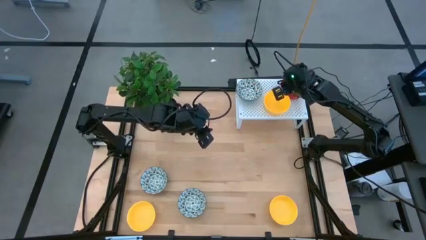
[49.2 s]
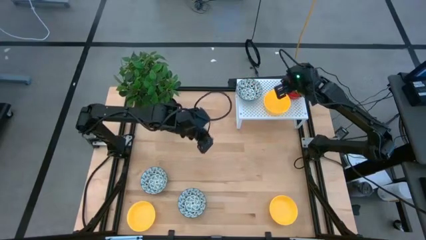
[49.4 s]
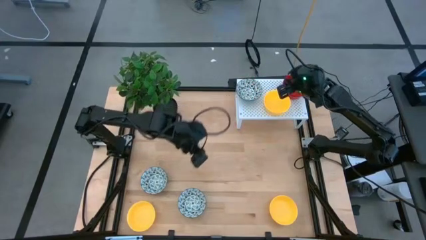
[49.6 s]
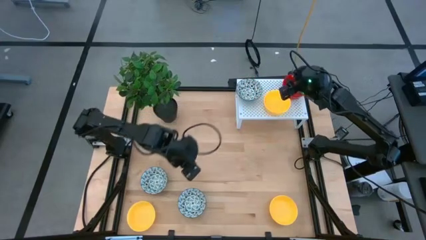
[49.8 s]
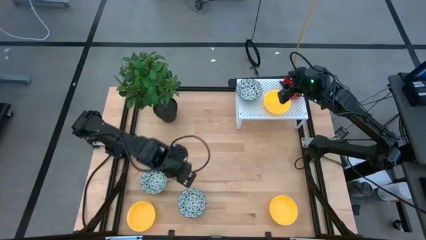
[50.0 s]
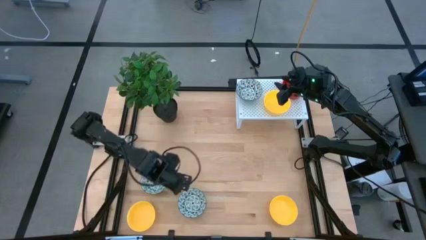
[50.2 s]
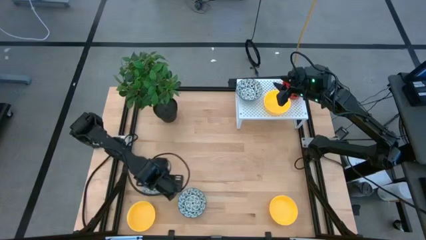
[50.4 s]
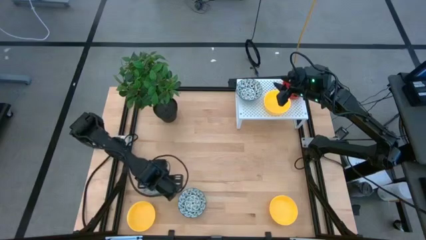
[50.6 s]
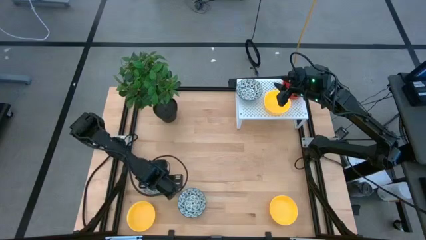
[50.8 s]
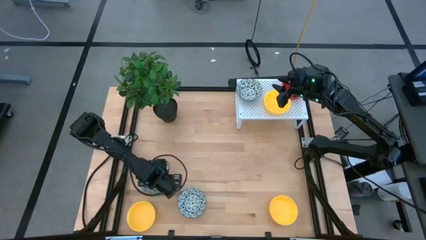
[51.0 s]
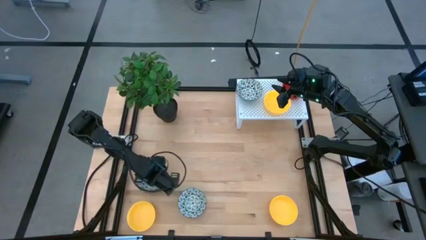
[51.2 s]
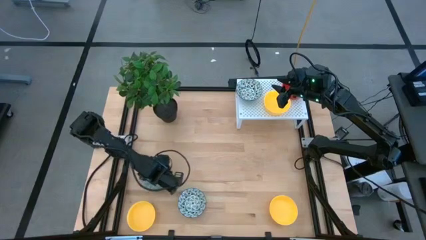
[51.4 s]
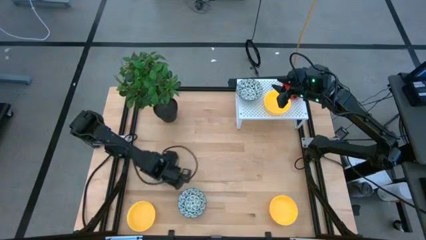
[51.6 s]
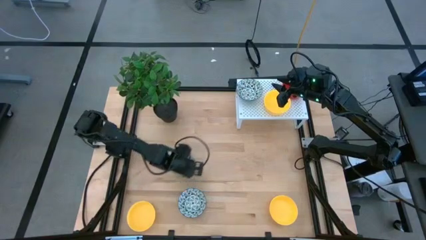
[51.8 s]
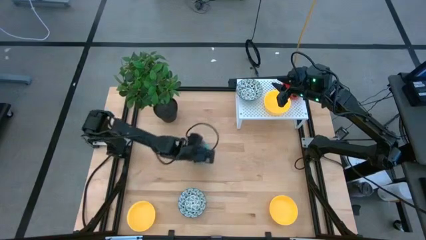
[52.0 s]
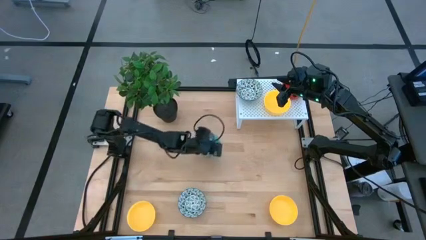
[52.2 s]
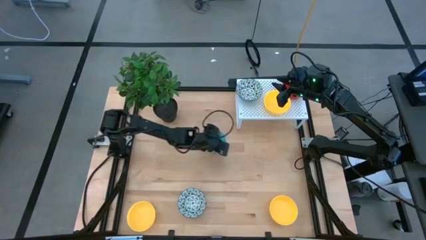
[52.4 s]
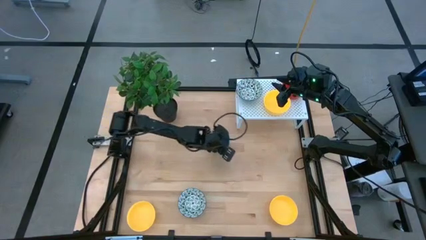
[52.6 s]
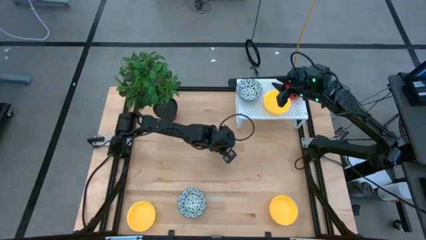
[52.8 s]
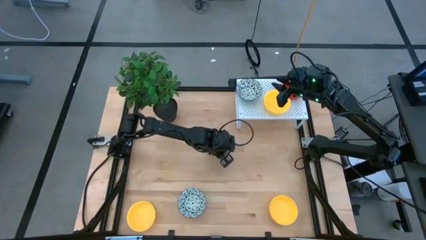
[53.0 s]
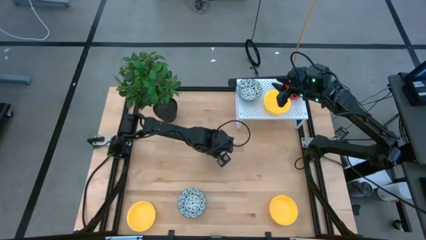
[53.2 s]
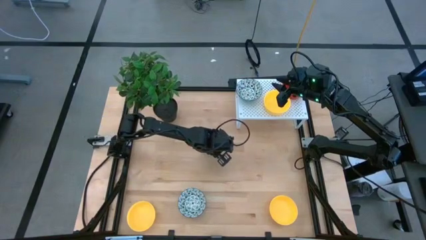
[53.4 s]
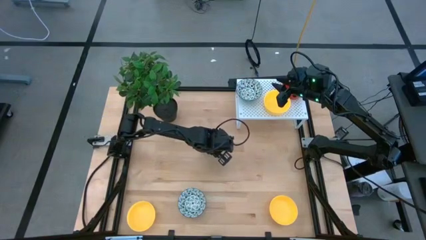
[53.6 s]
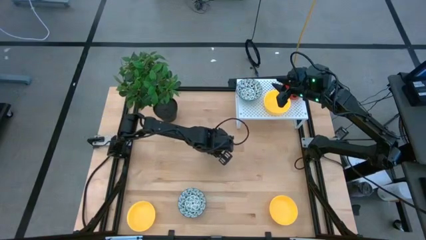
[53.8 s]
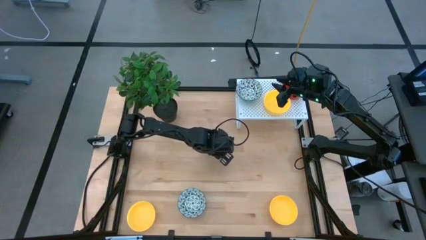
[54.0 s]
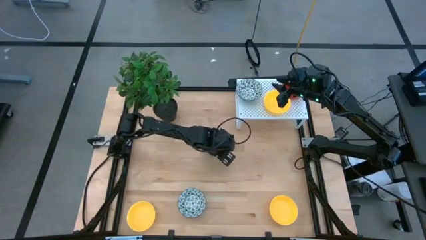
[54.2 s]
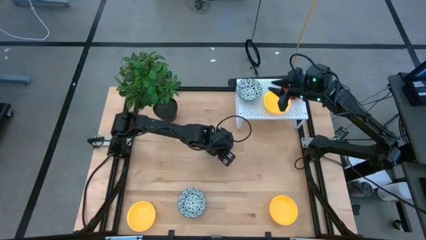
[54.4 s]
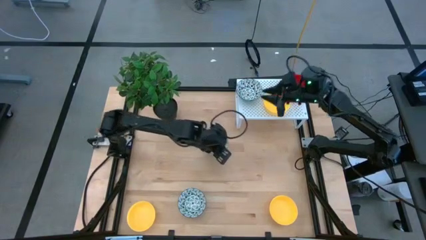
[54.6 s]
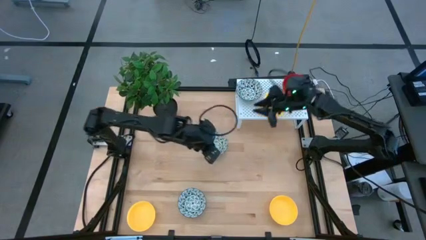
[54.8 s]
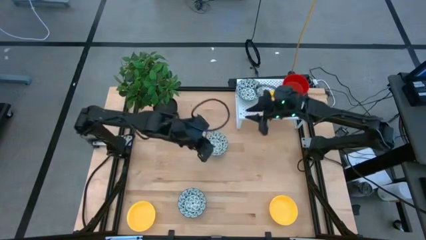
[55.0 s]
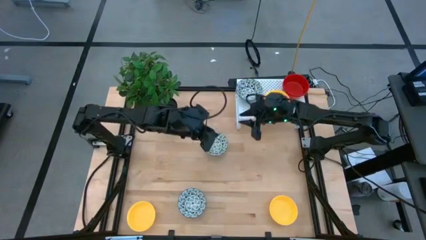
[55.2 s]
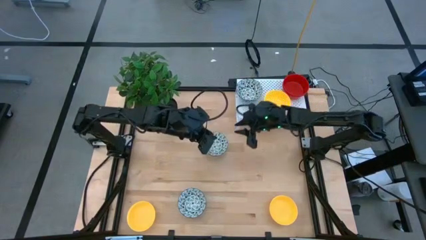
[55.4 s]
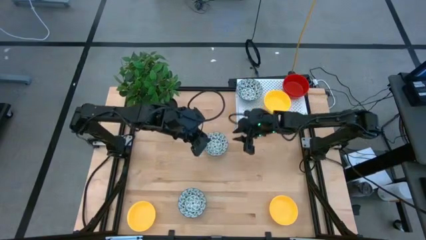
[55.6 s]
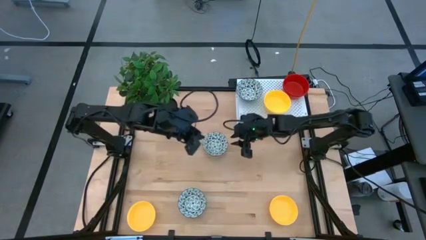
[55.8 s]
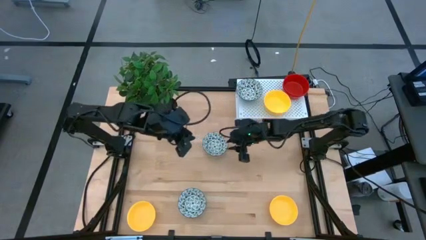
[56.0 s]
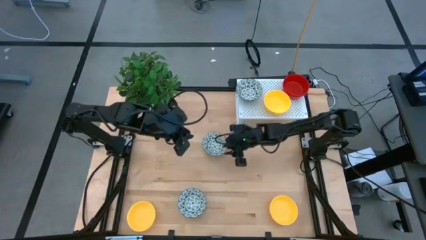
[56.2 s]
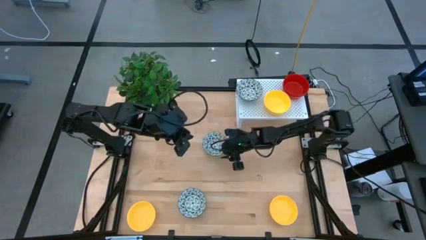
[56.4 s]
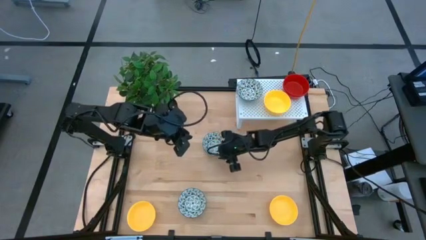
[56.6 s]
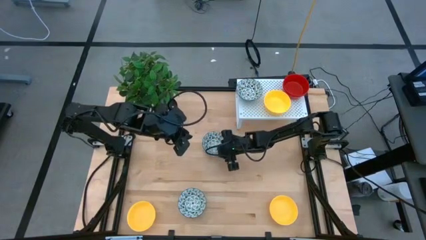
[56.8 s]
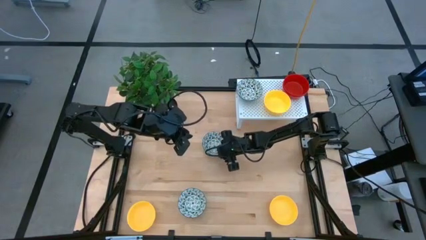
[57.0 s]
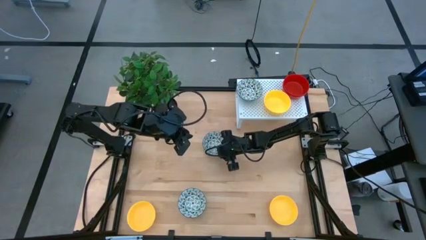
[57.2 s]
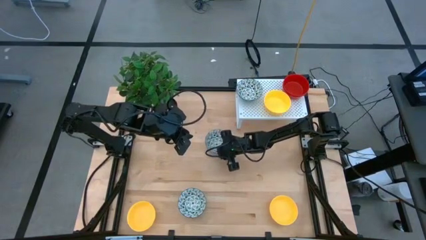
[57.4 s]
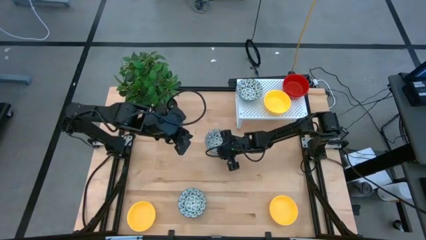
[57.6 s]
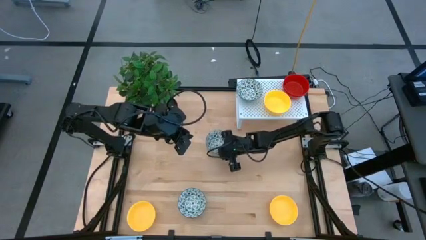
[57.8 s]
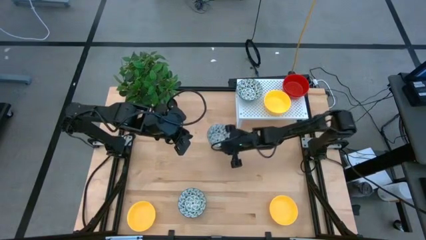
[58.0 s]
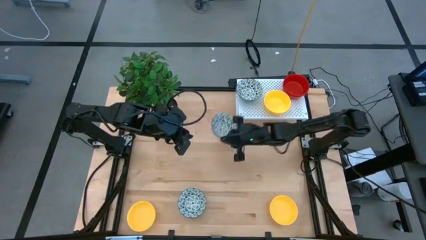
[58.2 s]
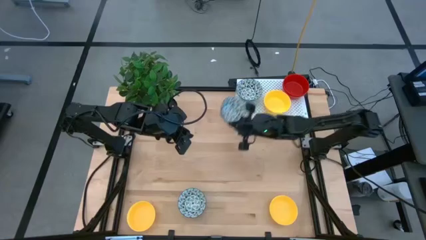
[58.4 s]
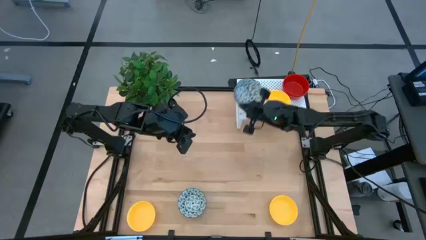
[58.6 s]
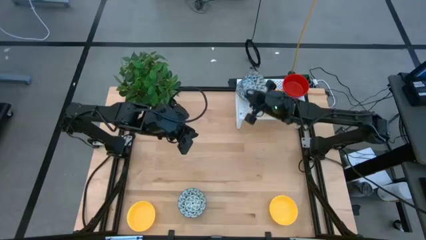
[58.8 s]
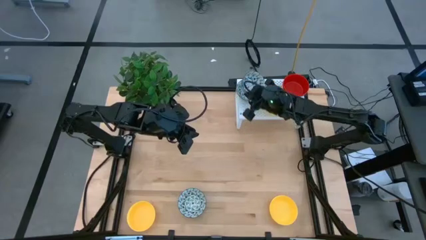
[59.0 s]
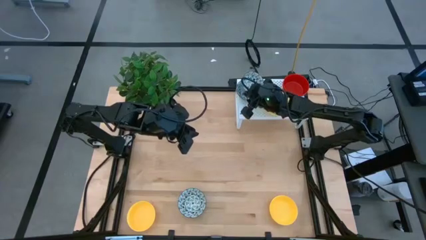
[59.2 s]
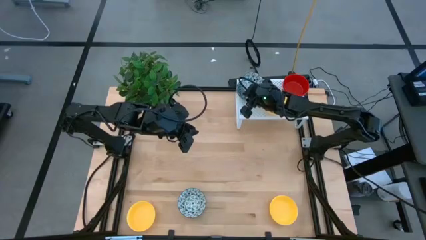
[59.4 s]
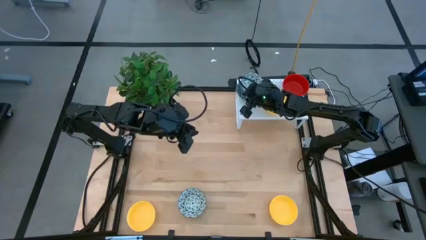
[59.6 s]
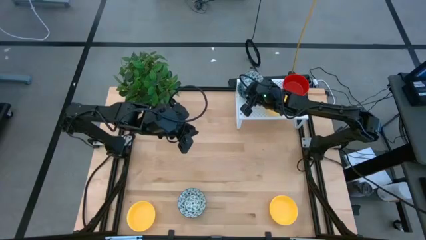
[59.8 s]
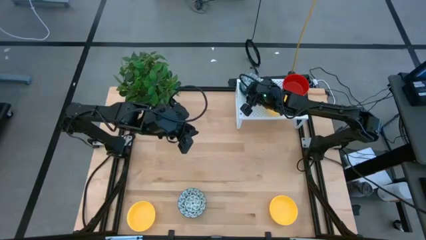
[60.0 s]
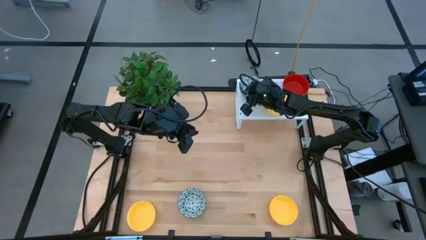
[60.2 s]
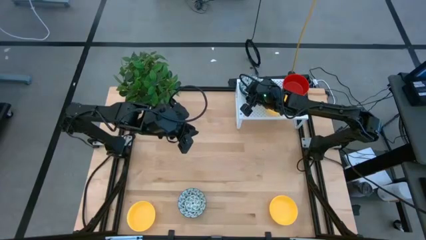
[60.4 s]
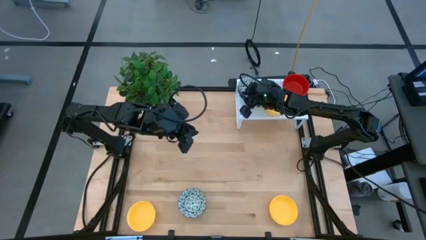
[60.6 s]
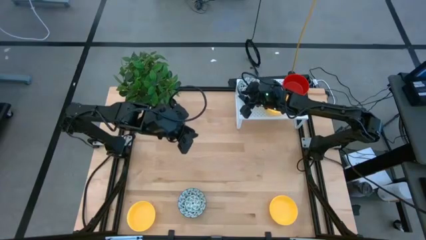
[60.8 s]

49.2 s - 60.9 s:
Task: Pick & Place Mini bowls
Stack the blue bowl on the blue bowl on the shelf

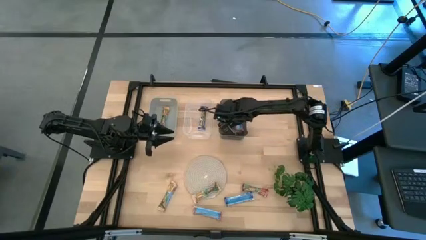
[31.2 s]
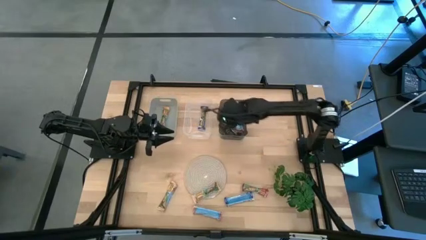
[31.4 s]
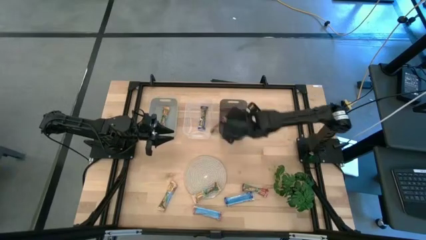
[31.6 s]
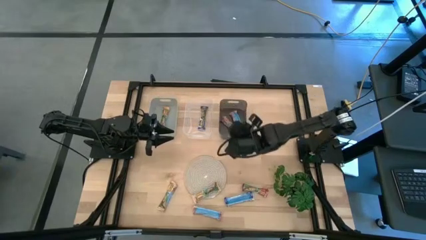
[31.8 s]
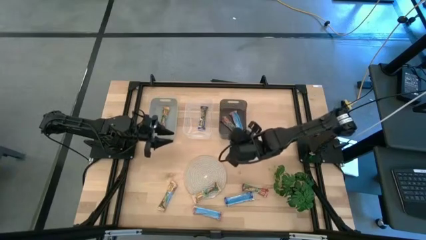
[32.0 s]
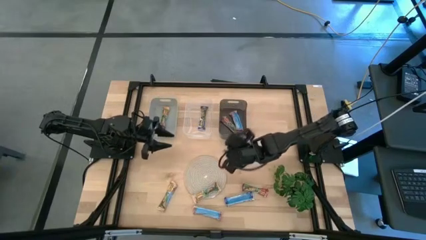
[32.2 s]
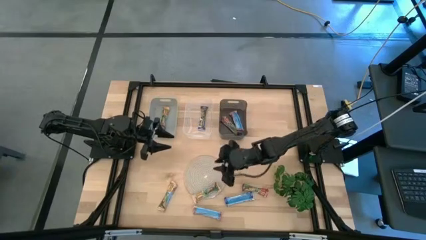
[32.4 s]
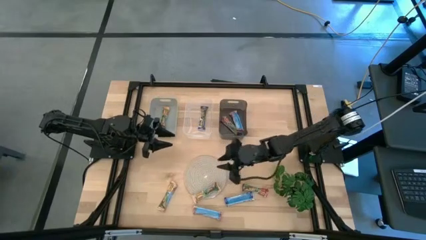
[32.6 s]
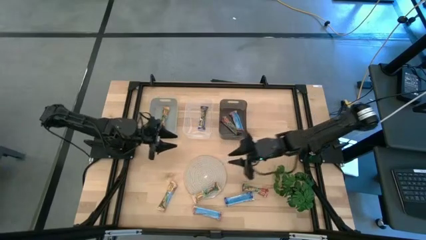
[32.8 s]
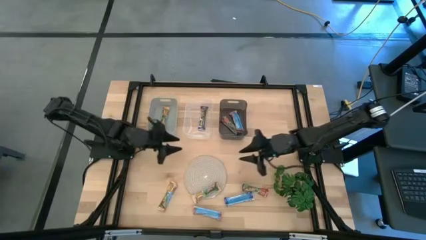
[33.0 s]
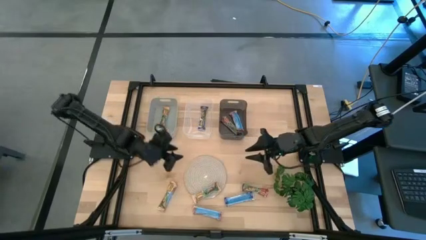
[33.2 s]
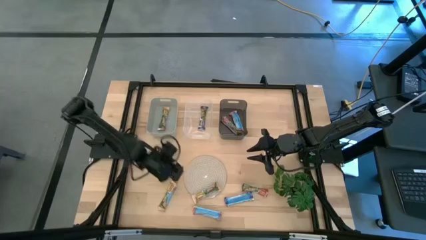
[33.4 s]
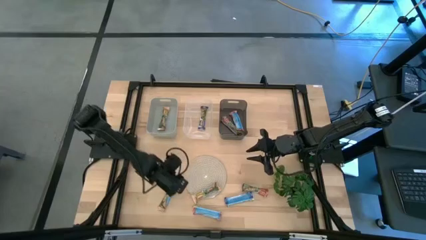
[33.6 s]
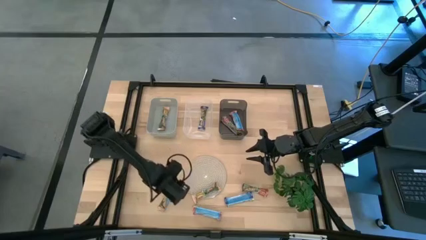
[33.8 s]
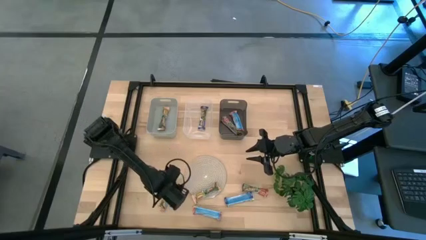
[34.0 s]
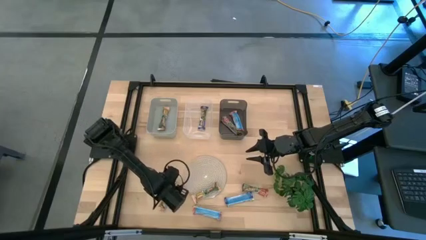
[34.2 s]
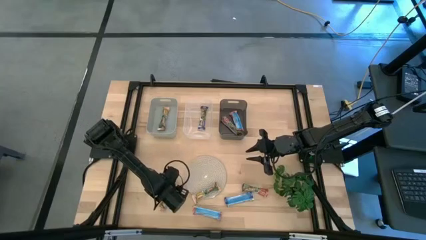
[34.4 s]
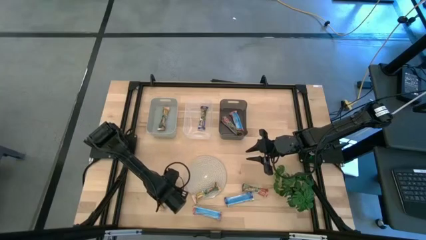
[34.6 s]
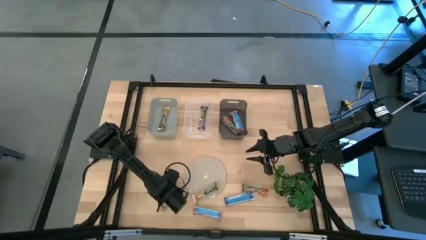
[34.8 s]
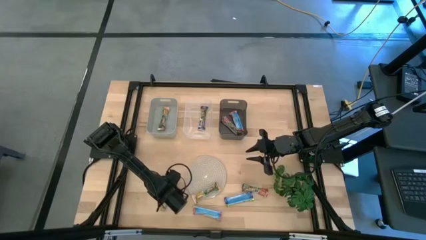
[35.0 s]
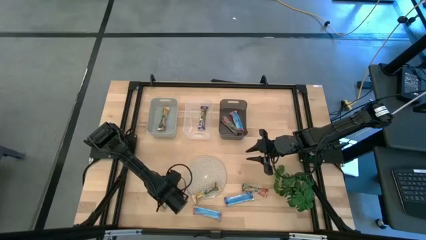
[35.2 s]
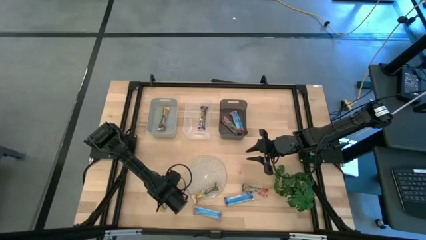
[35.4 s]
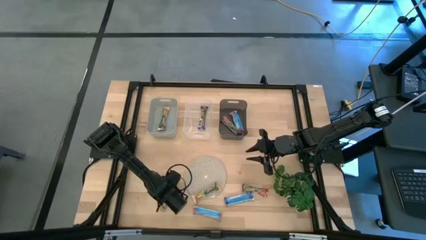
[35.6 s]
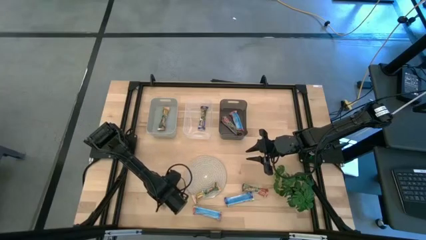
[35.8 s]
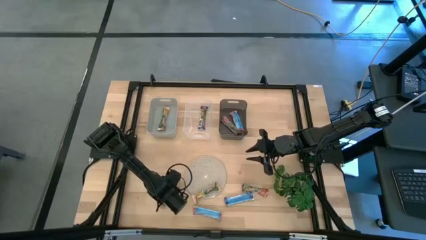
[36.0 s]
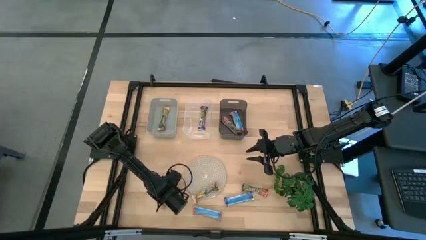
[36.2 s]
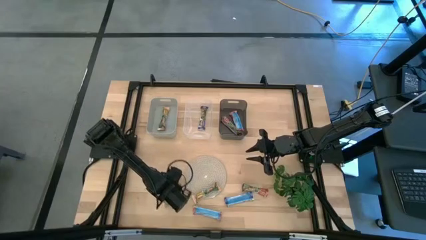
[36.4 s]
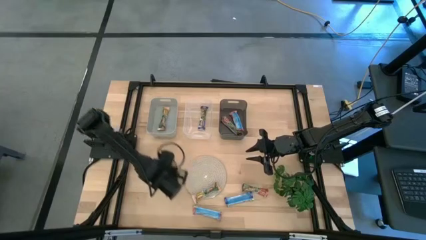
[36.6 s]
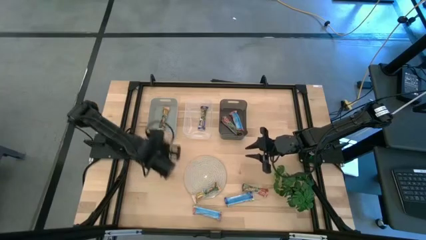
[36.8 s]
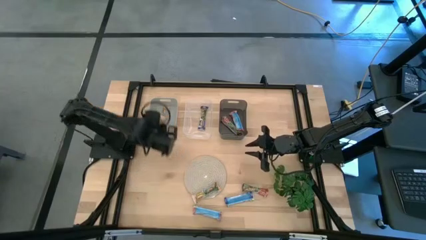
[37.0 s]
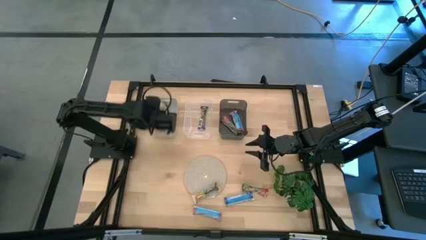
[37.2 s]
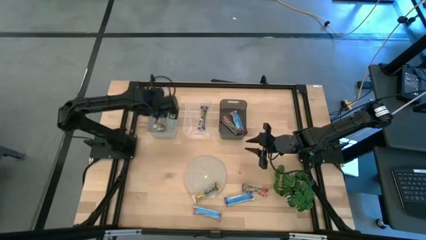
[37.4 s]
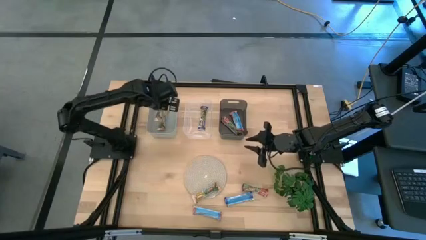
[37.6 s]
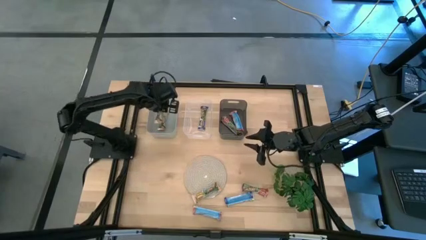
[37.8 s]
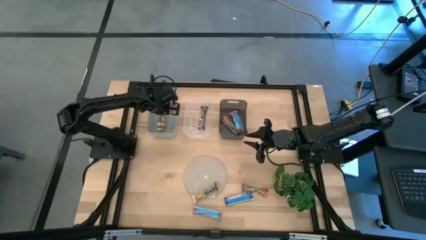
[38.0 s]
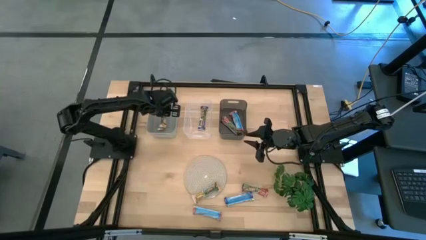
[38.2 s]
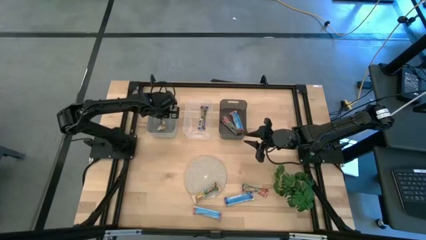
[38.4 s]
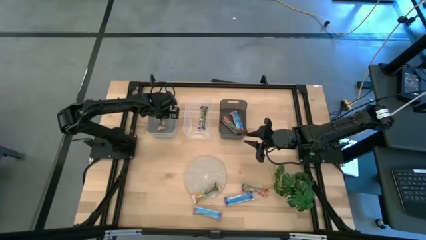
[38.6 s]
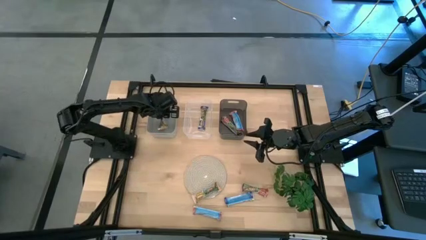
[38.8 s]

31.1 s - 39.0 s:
Task: Pick and place Granola Bars by type
Put the yellow granola bar into the gray bin
